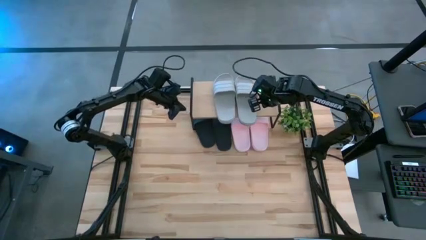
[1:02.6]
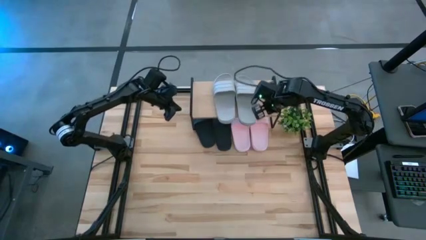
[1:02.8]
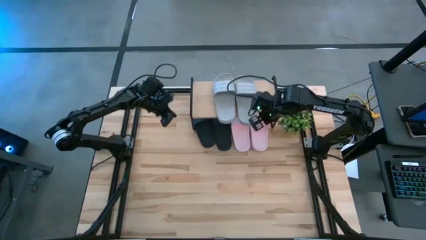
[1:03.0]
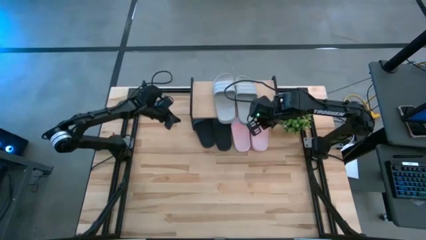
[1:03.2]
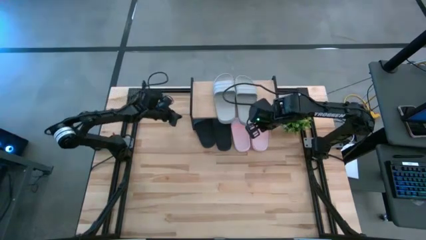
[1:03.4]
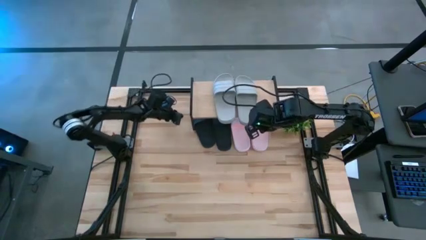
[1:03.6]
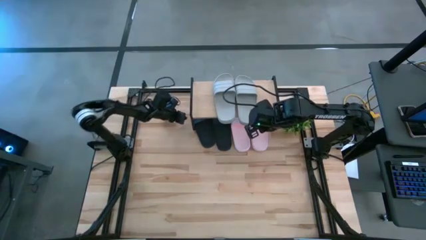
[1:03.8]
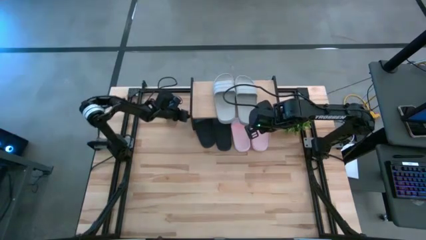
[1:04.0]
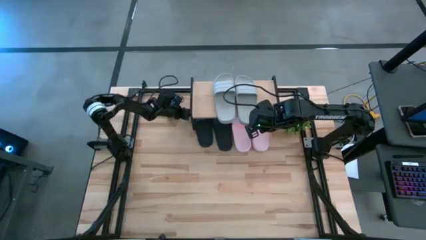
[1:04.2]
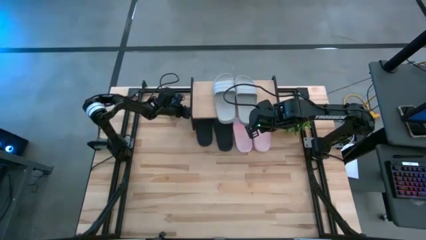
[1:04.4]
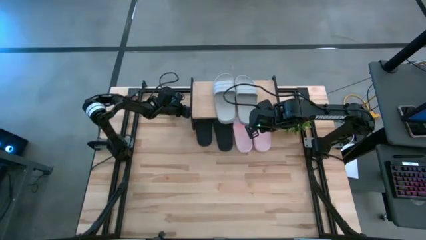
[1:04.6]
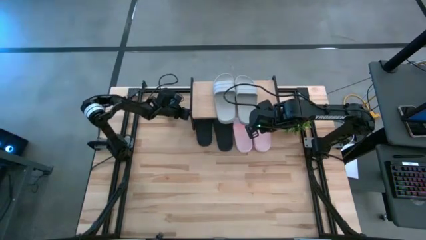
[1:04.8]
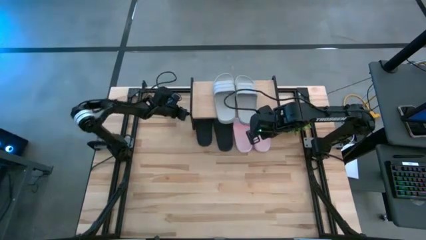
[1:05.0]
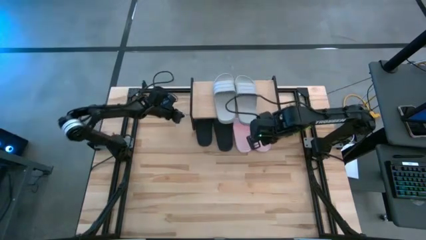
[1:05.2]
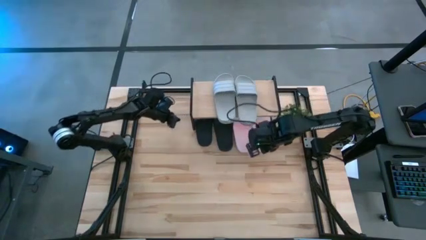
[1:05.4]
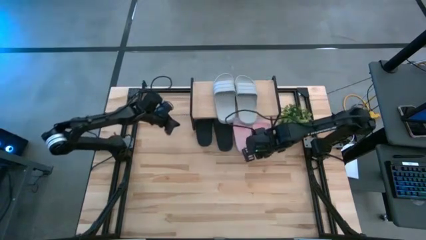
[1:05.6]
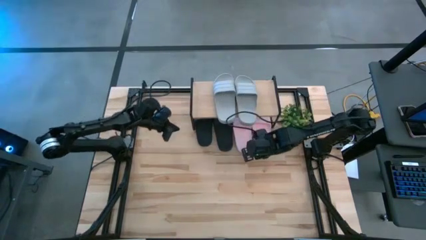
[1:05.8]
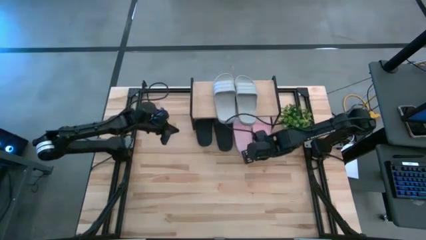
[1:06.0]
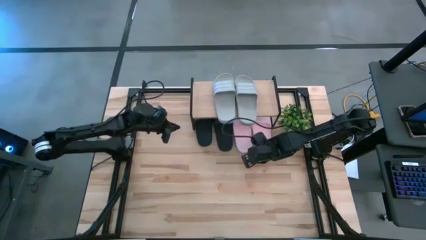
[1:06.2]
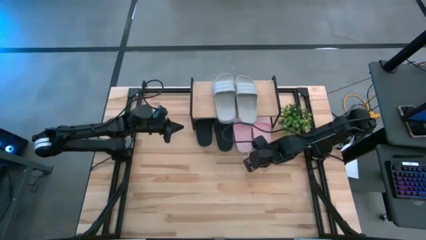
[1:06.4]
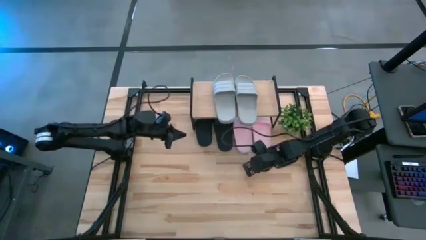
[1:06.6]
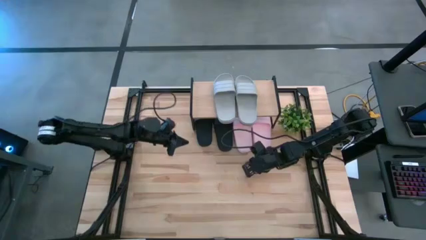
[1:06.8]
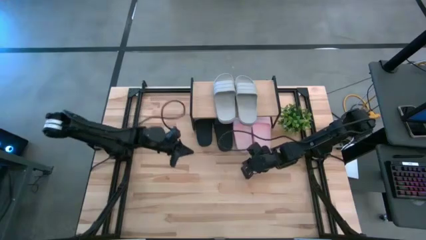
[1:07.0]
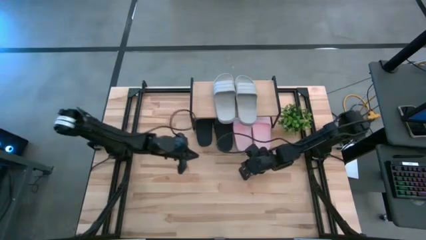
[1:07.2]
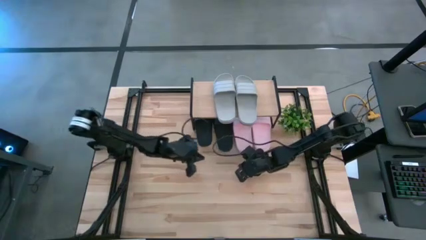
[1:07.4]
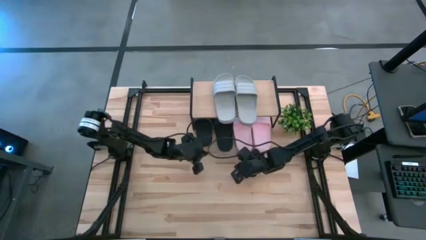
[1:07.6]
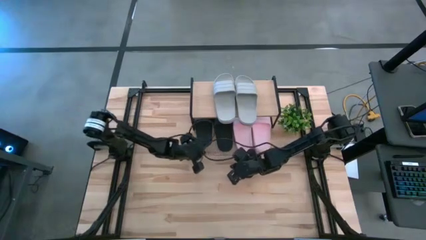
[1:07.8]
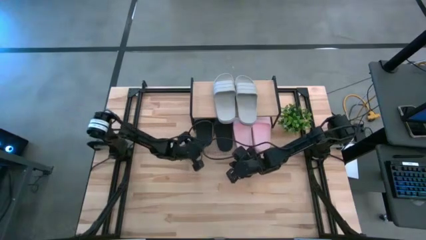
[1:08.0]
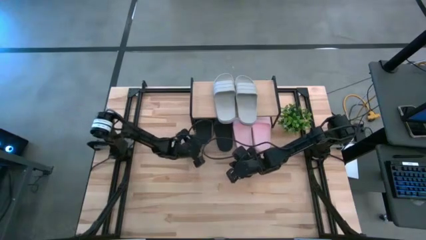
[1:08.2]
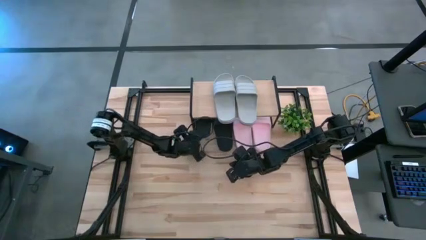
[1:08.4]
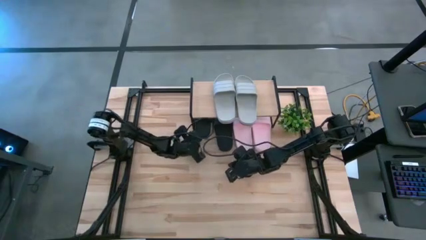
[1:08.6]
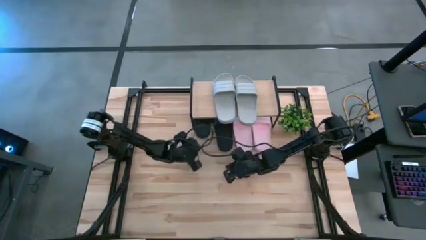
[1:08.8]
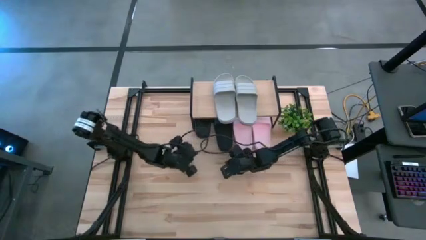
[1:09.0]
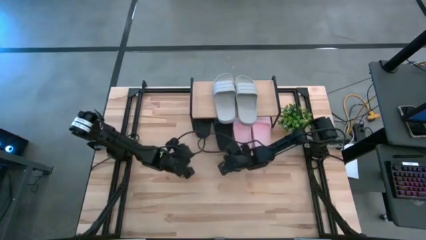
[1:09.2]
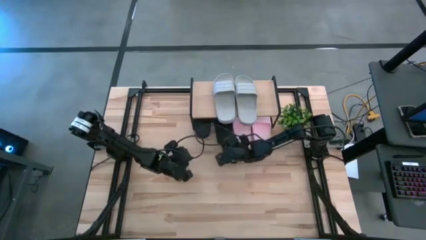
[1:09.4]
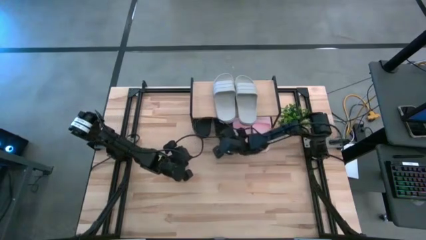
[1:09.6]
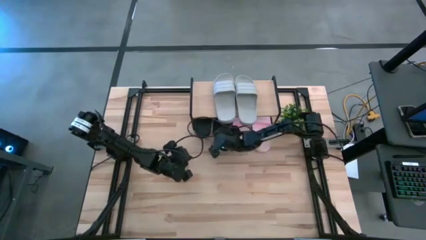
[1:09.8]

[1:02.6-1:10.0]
Task: Pick and place slides into the shelf
Adjust the black slippers under the shelf

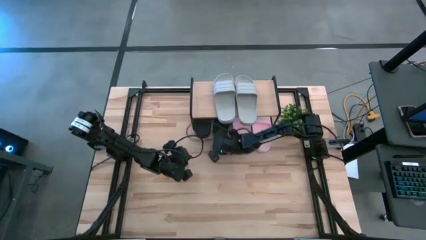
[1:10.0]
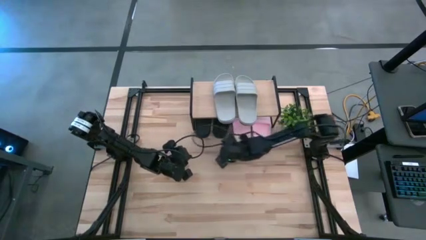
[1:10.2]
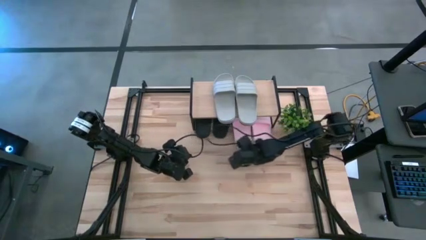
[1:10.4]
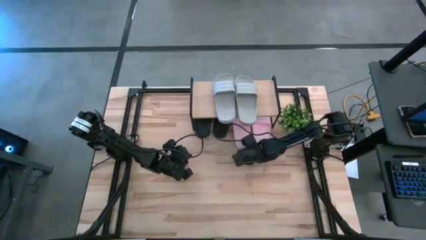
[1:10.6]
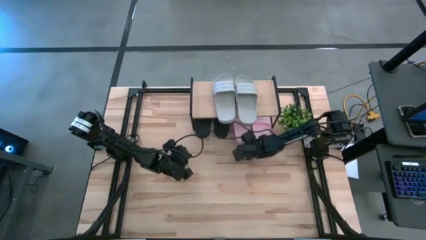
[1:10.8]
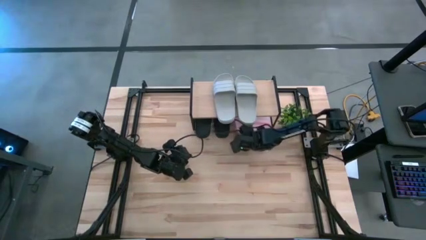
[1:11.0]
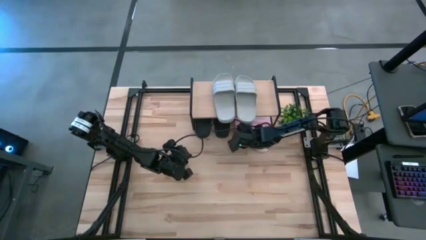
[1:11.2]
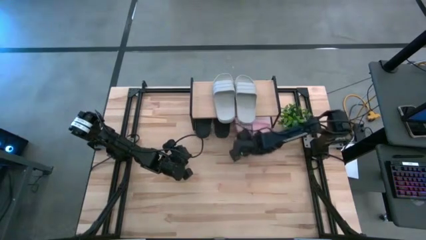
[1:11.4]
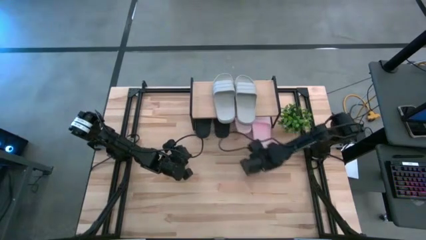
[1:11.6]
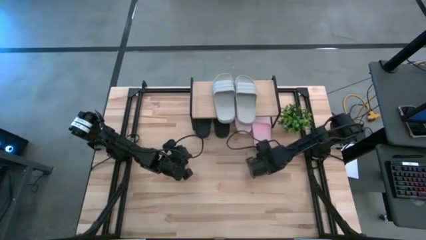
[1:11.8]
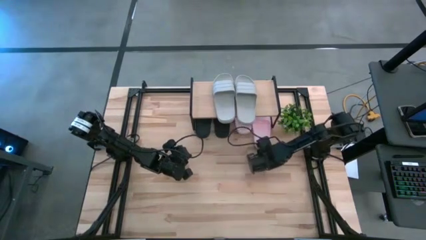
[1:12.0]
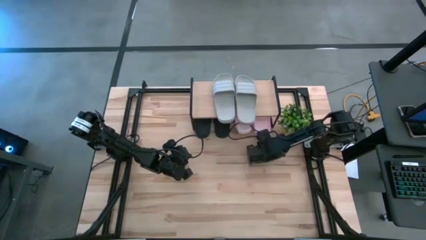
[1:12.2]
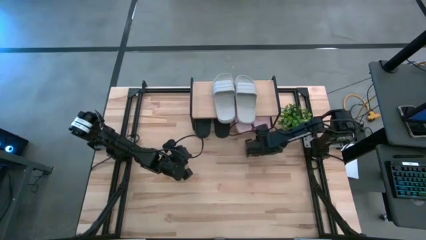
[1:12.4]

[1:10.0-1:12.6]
Adjust the pink slippers under the shelf

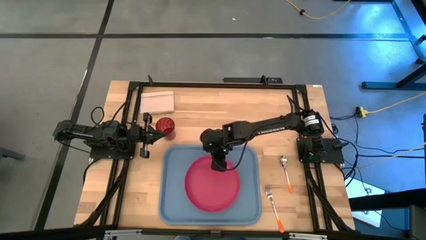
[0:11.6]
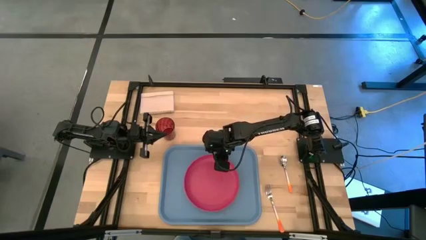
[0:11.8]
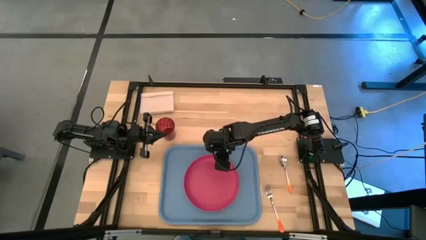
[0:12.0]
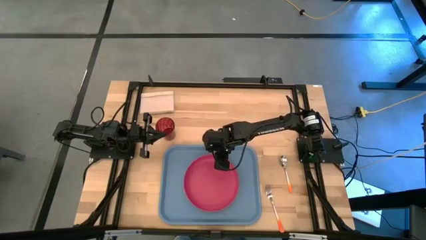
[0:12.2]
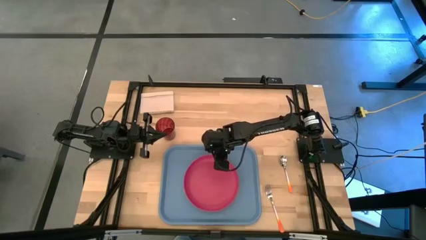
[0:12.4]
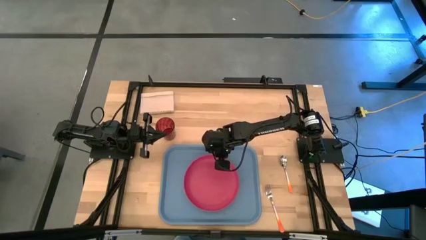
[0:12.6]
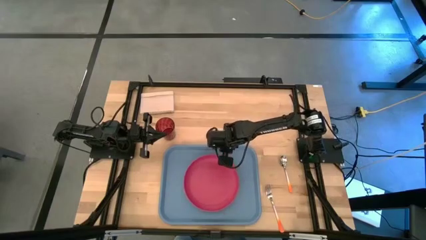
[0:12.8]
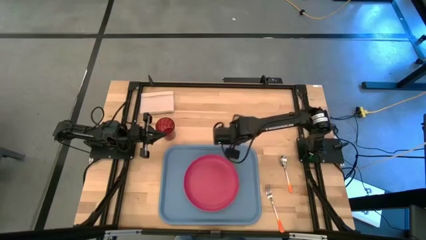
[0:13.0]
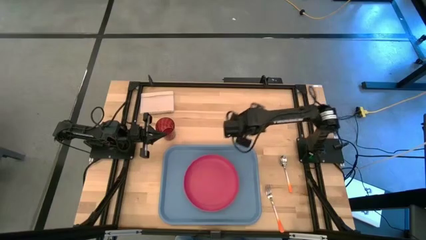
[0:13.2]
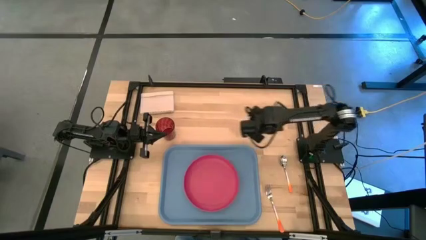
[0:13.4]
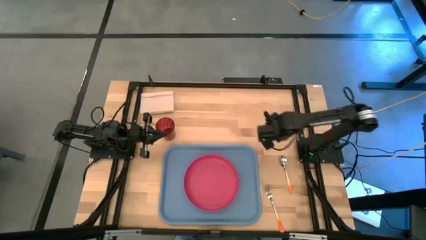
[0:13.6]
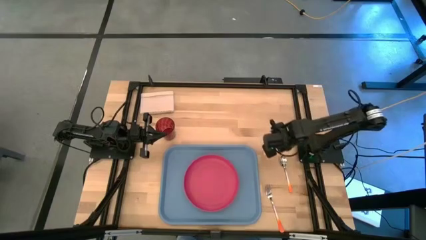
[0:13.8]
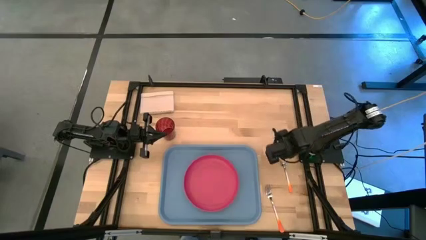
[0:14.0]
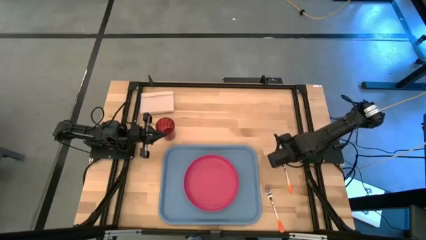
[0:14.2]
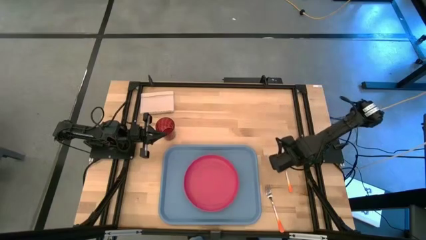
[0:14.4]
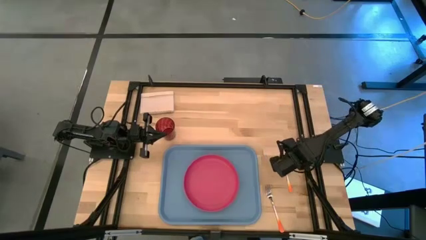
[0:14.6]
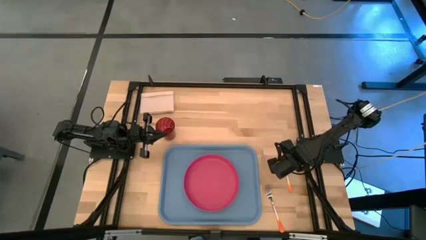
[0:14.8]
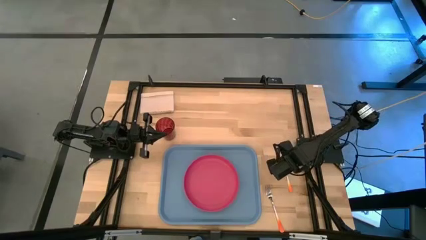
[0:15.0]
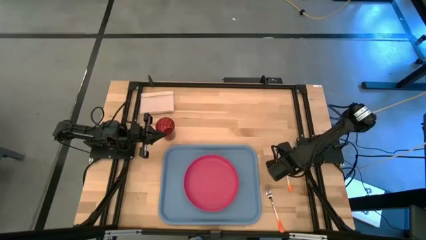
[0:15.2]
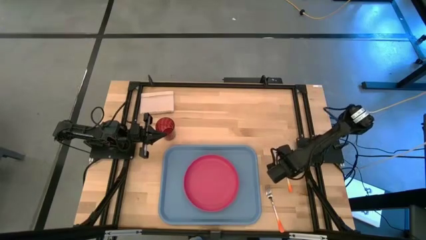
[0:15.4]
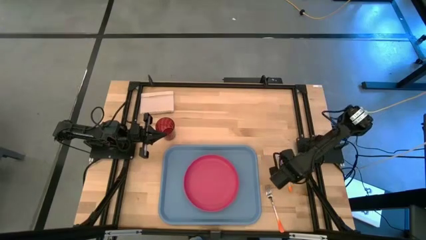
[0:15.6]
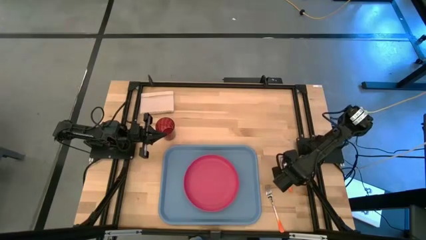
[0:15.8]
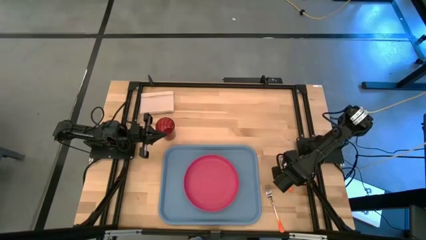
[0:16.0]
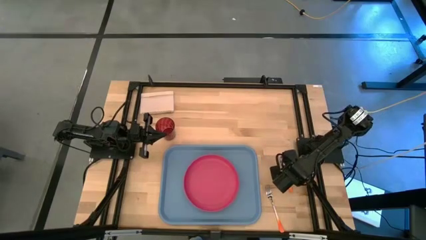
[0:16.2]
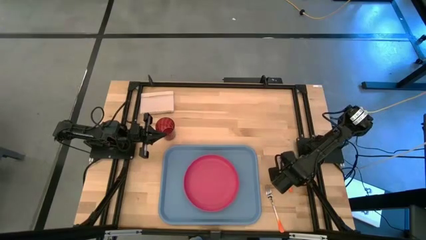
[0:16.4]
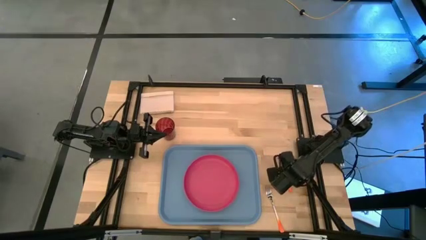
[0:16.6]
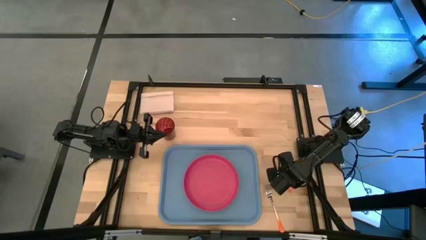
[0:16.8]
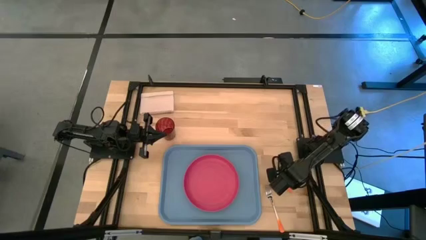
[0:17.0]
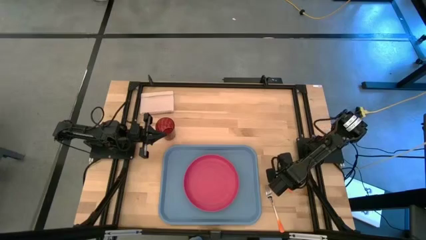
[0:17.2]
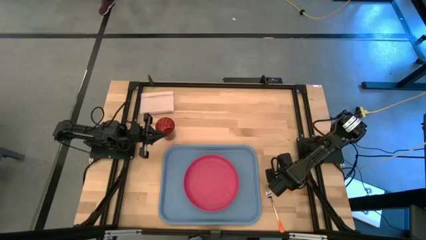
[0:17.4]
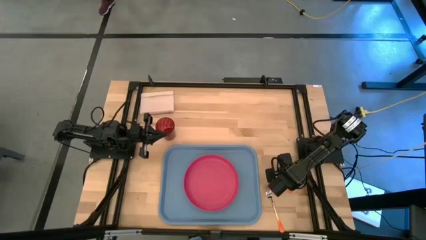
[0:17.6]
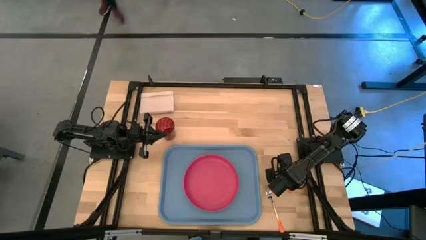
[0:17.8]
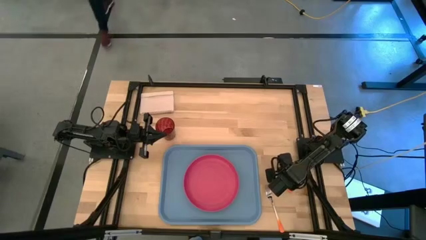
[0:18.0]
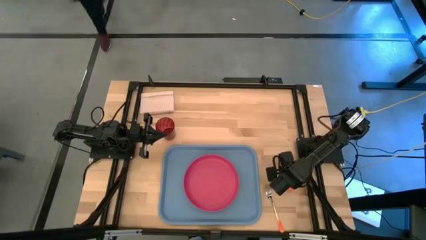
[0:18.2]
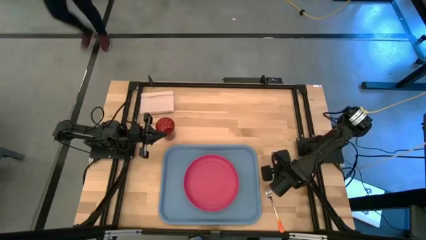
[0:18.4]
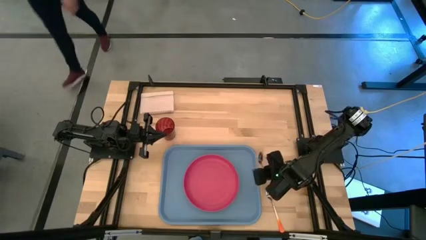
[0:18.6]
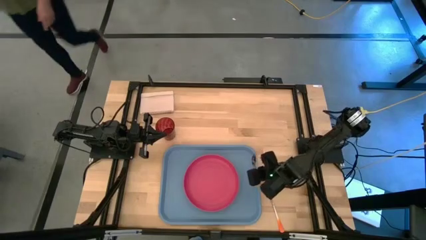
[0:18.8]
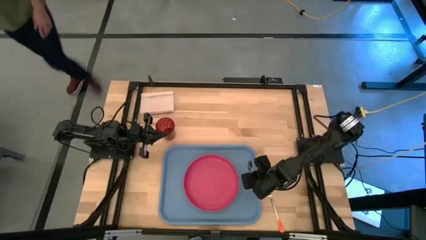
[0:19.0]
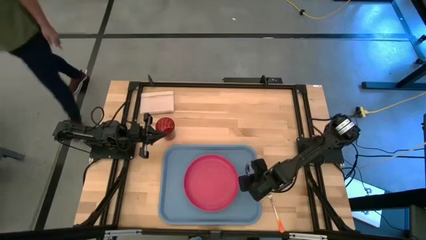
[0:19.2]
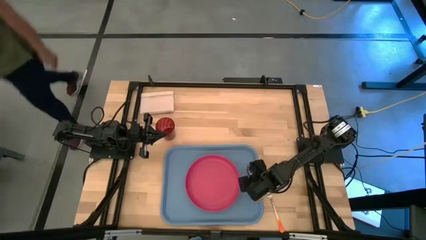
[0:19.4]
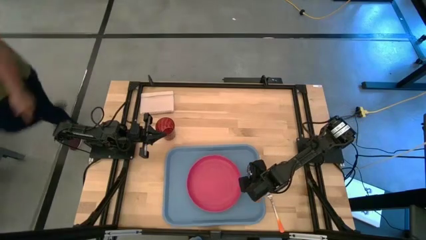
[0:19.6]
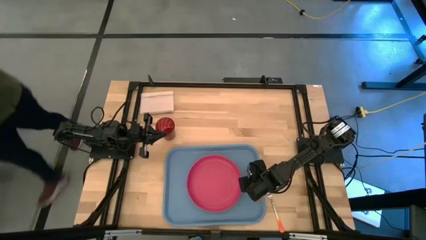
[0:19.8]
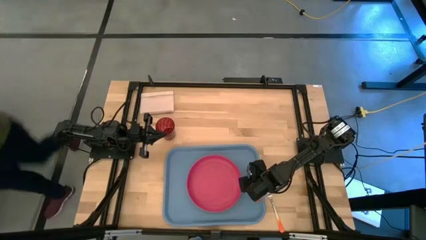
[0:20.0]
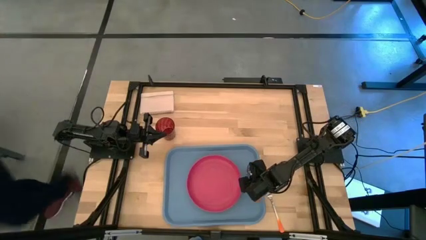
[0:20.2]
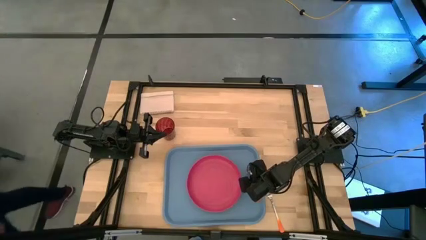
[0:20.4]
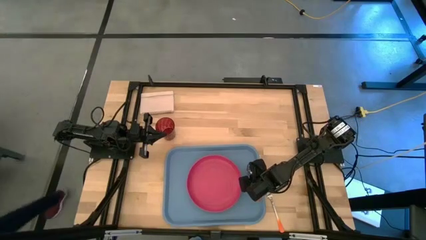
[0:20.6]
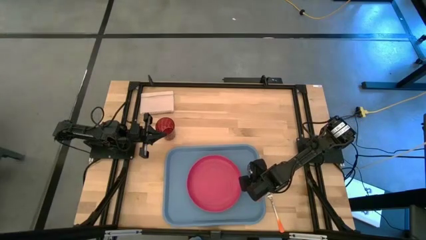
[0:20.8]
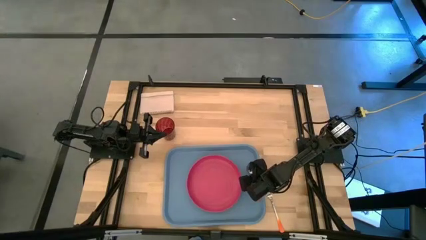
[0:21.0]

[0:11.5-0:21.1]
Task: Pick and place plate/cup/fork/spoon on tray
Put the orange spoon on the blue tray to the right of the red plate
